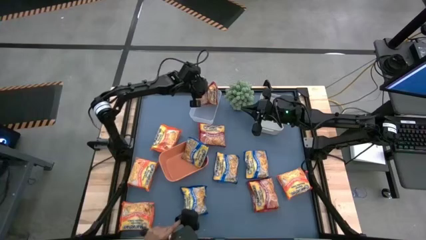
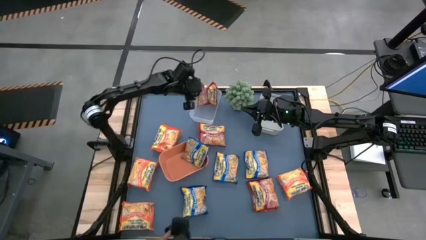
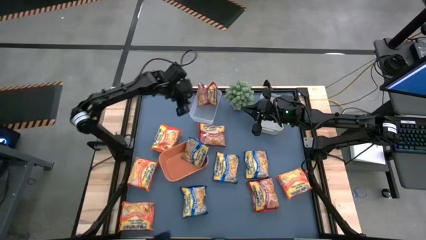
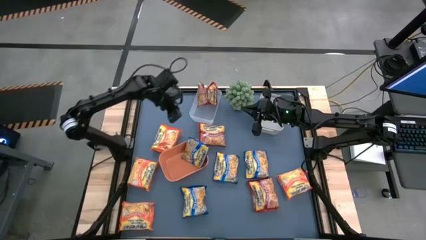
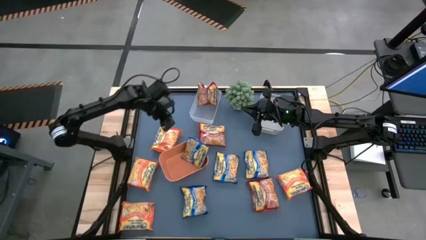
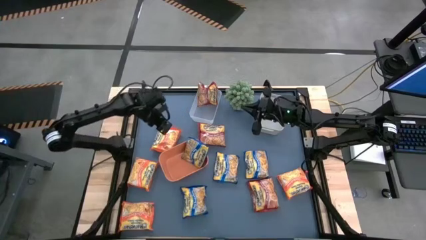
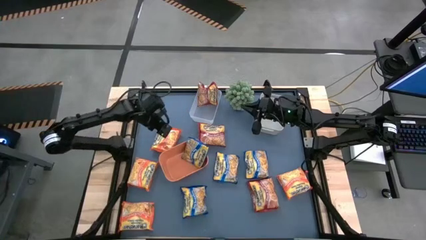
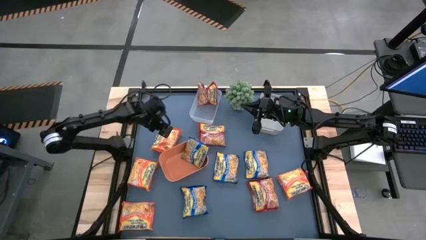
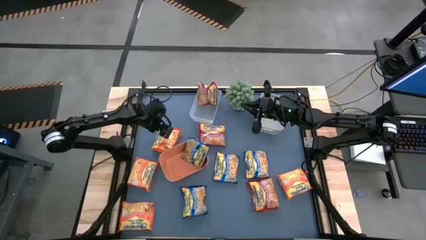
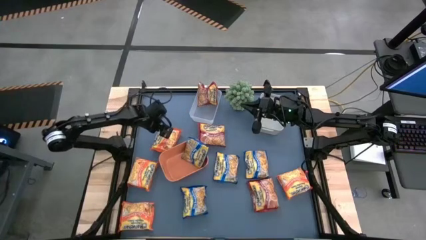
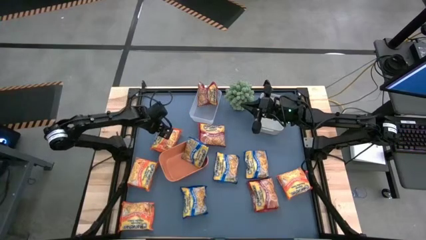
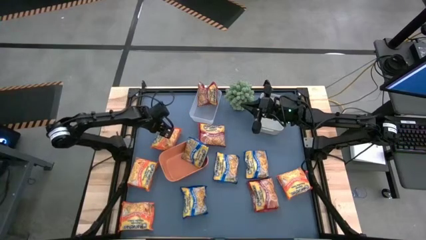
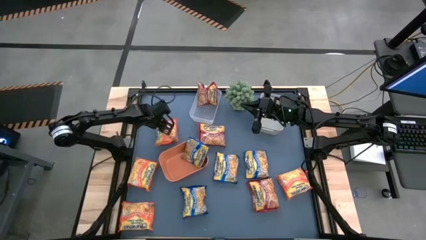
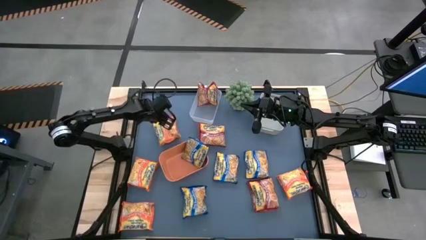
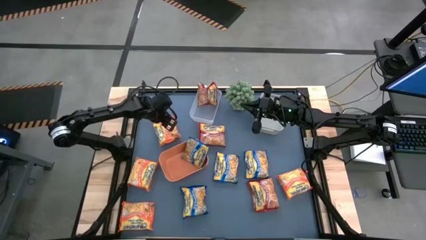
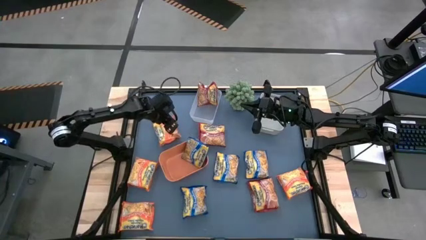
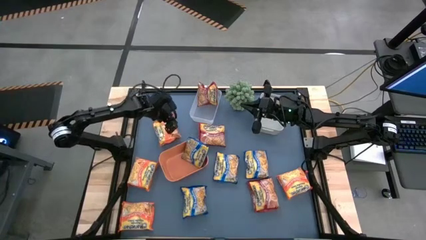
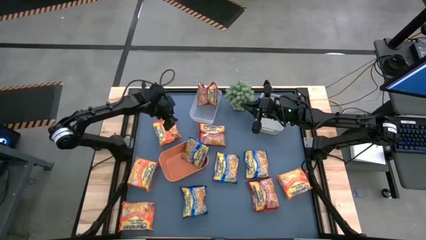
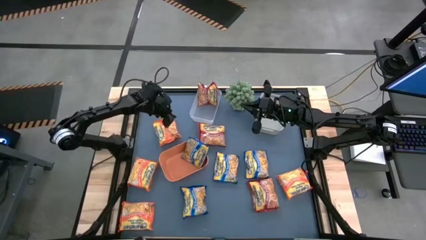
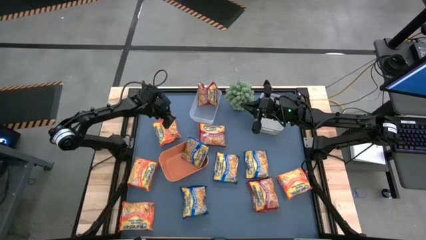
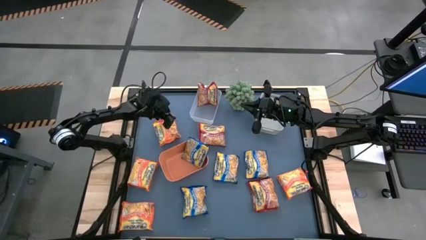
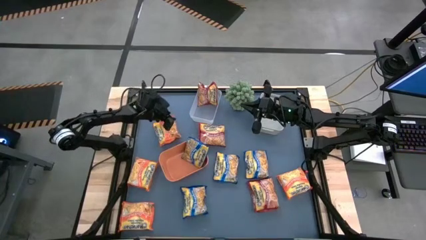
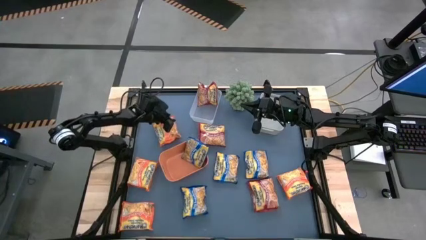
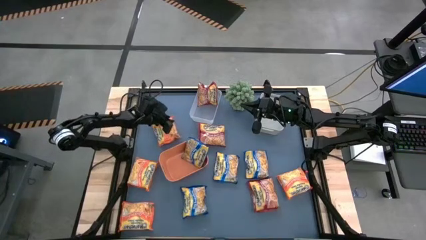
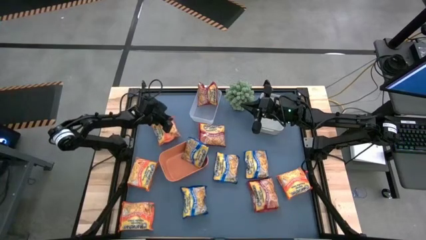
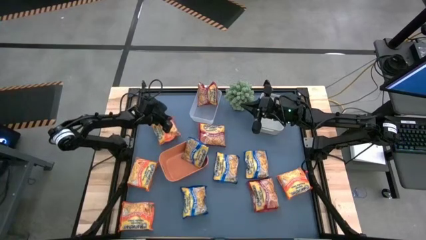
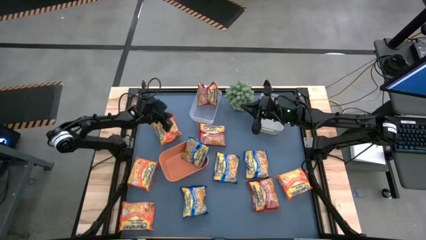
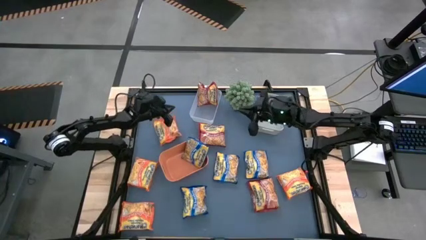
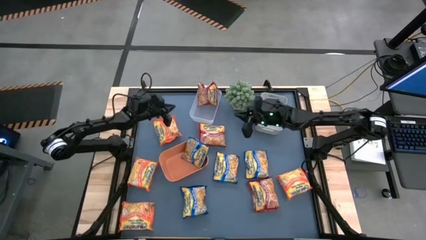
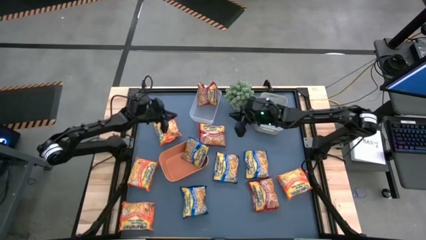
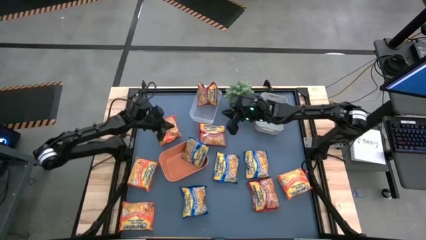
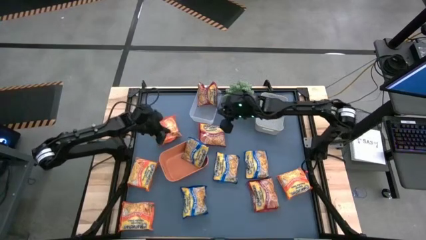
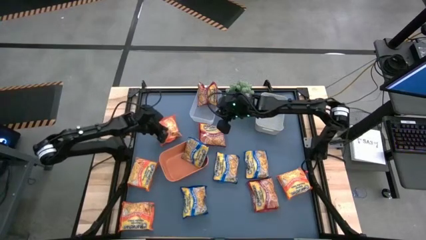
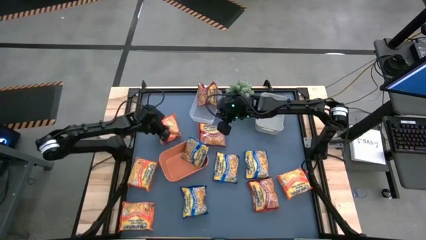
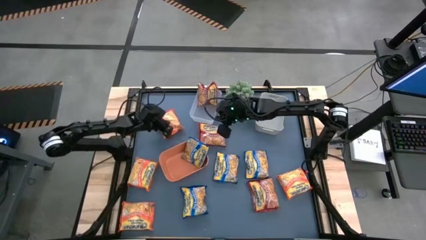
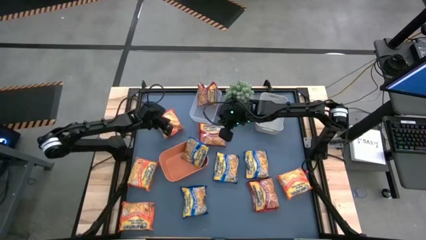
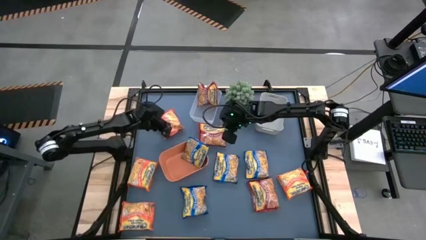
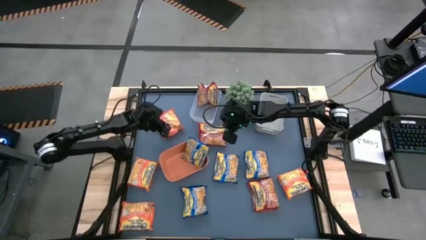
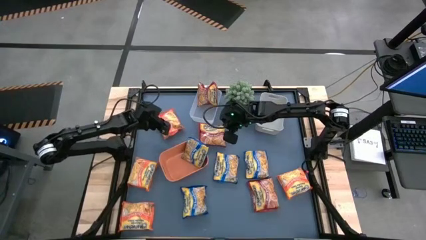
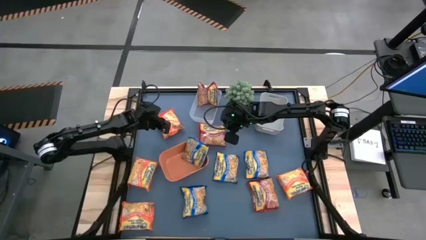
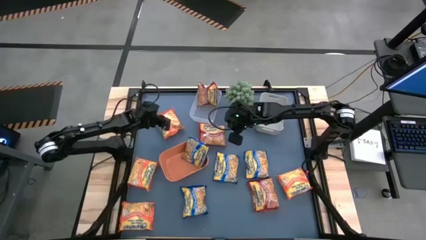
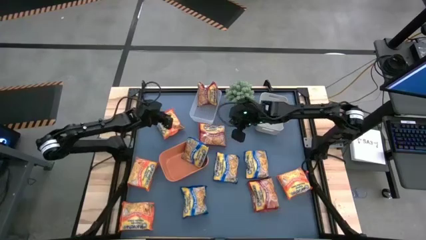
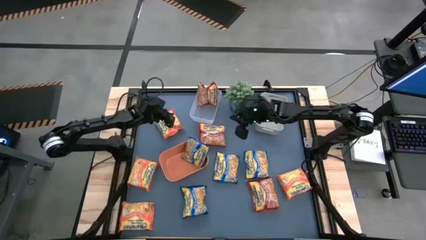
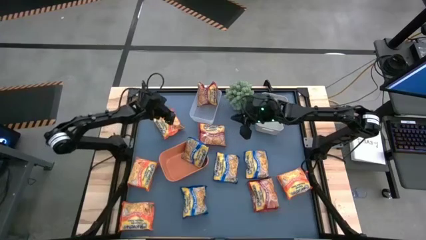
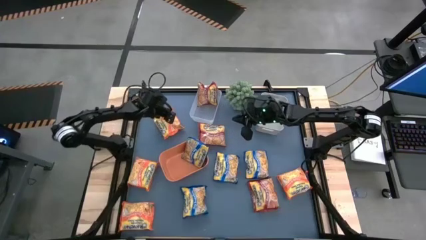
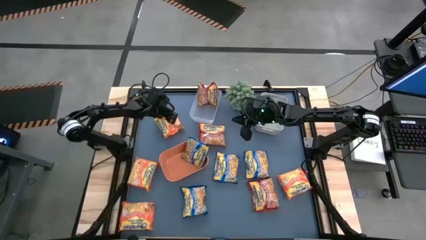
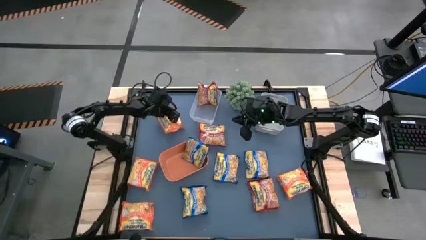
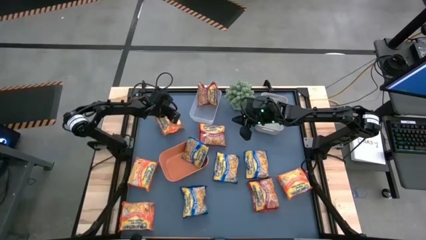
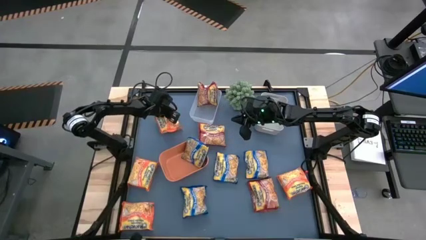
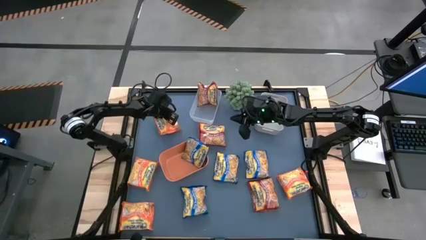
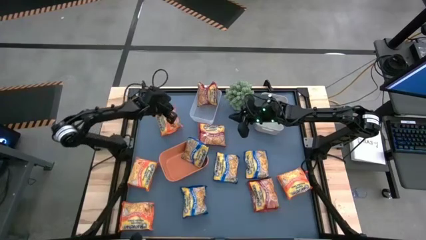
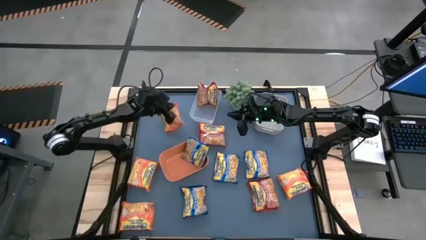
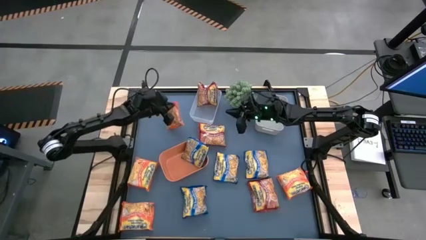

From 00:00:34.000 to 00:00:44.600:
Task: Sort Maruchan noodles
Put the orange noodle pack into the gray bin

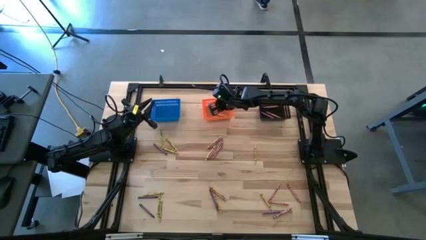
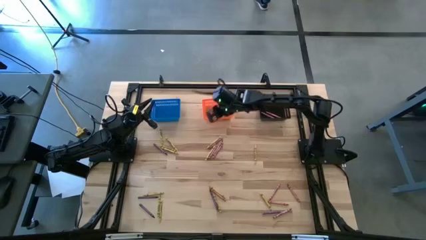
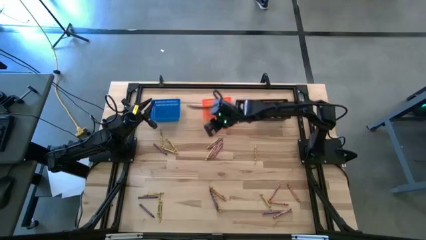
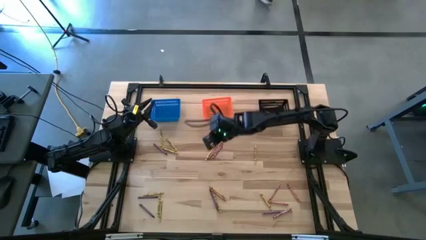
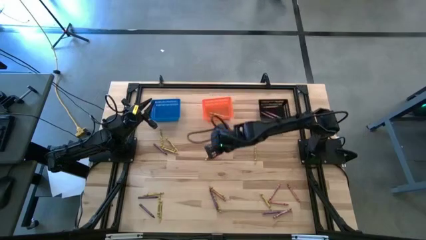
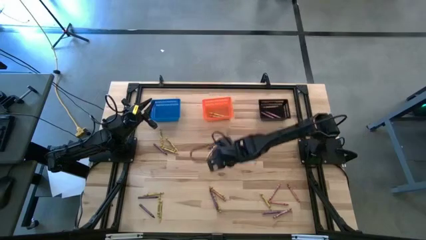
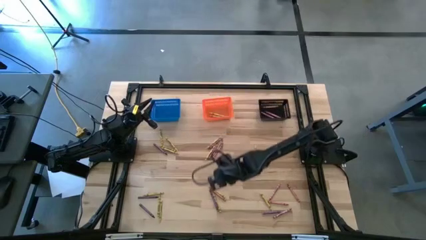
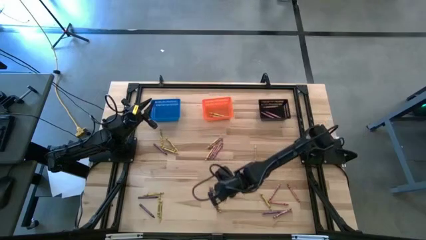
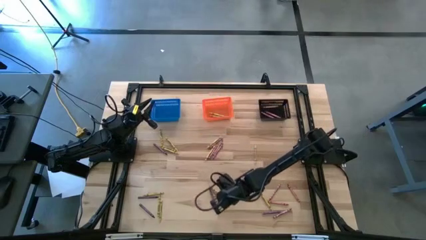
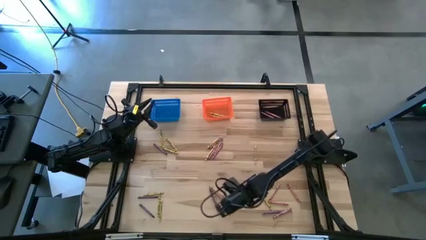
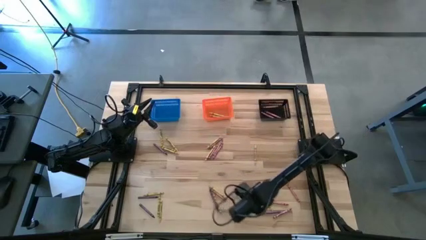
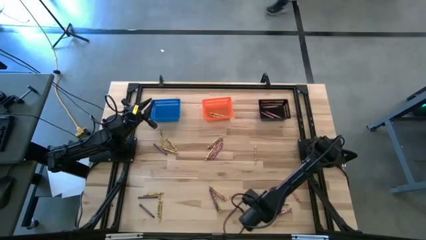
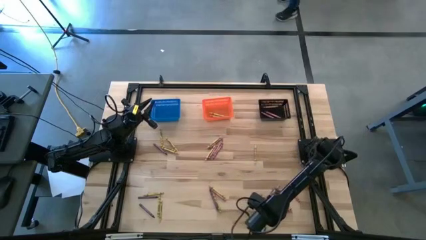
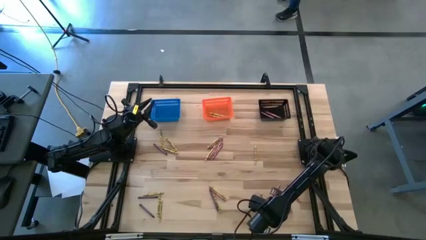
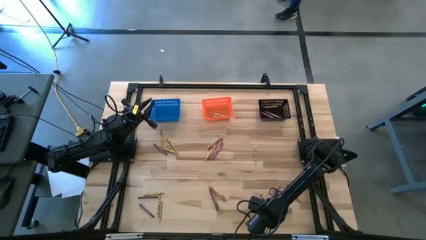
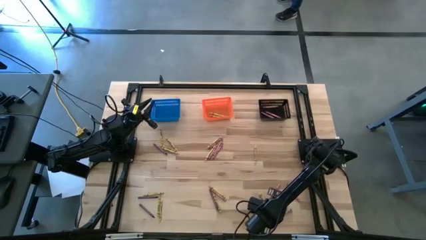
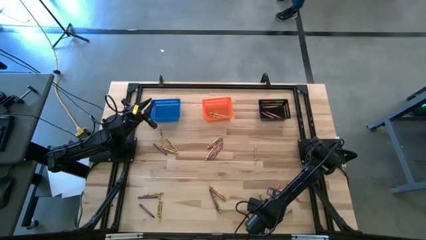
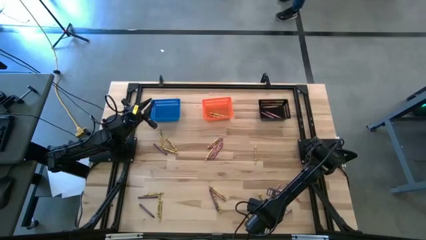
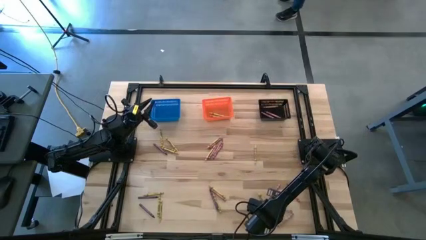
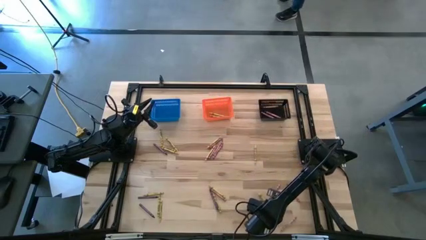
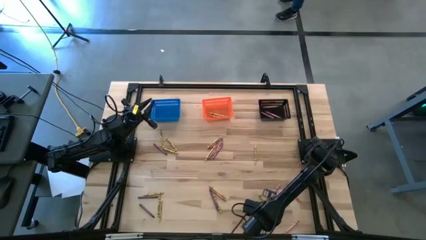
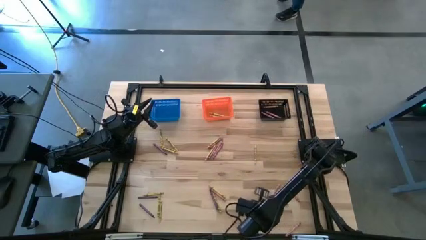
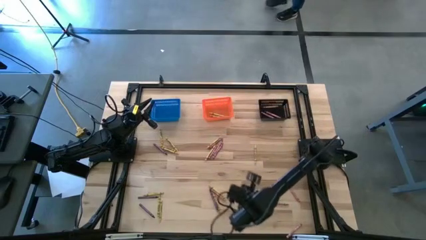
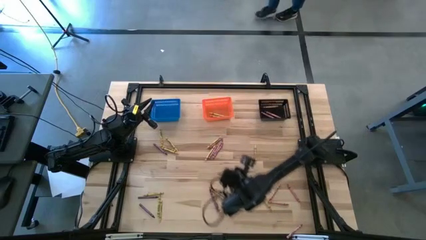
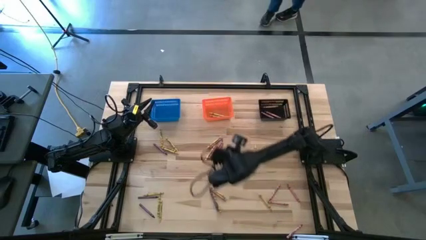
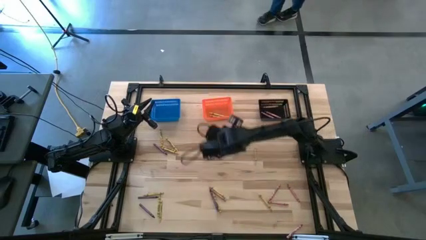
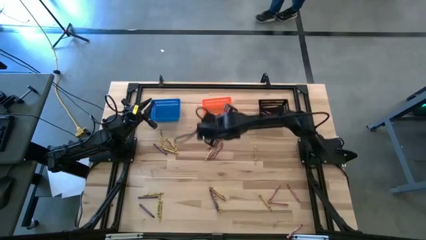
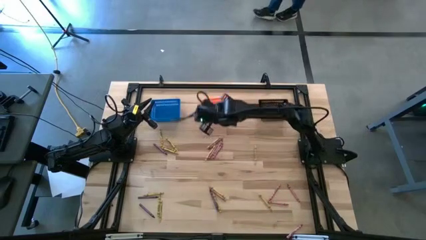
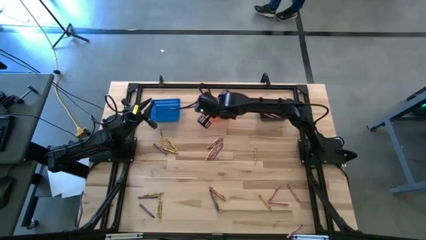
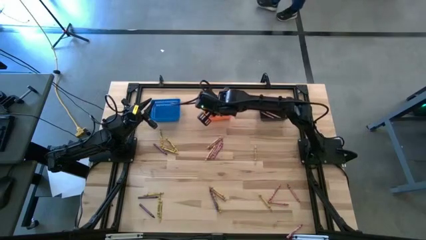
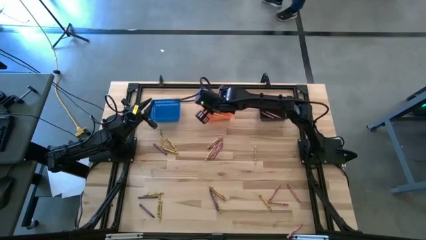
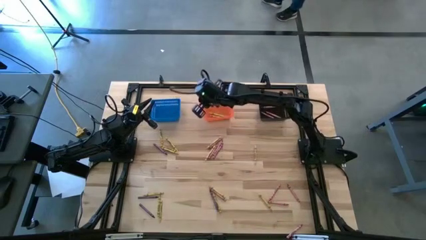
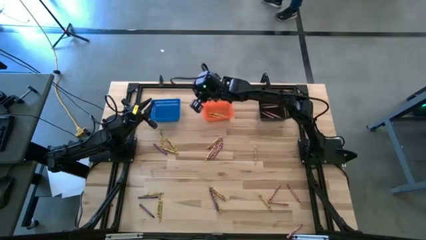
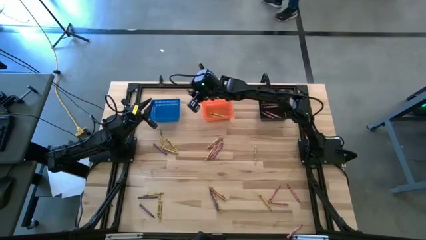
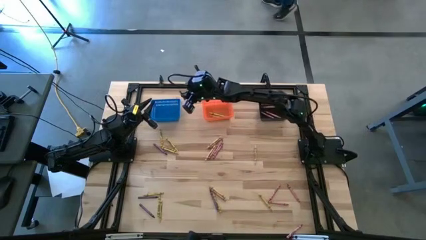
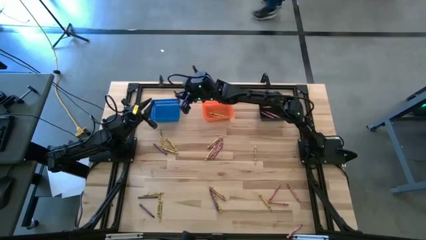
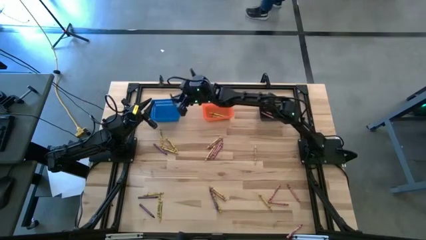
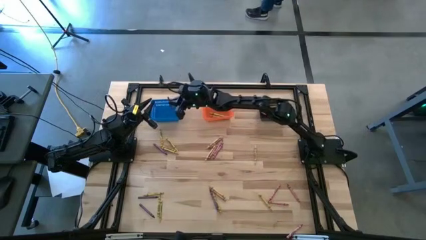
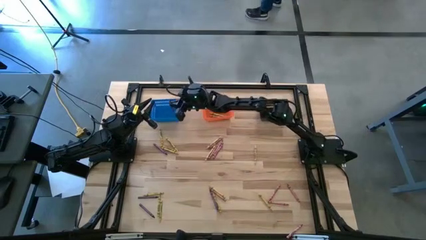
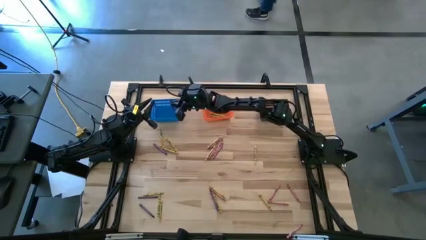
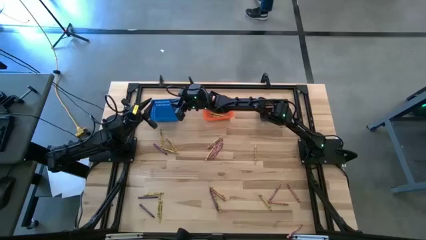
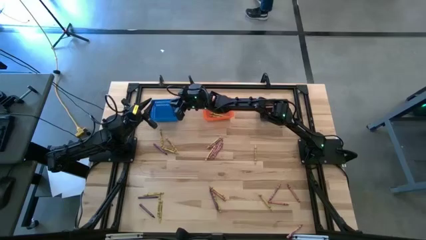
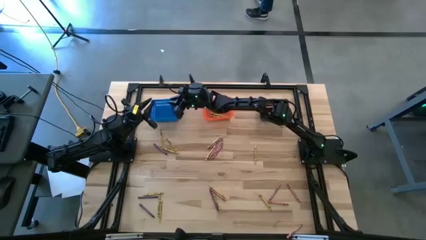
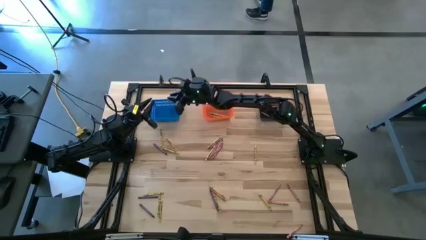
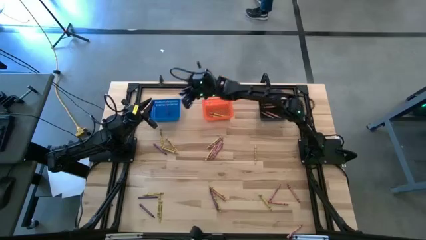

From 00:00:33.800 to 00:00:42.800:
Task: Sort crayons
Put the violet crayon into the blue bin
